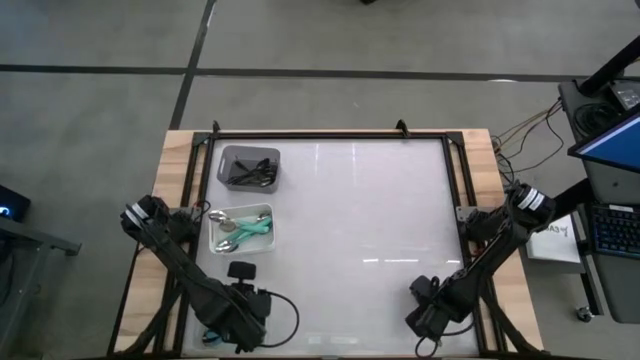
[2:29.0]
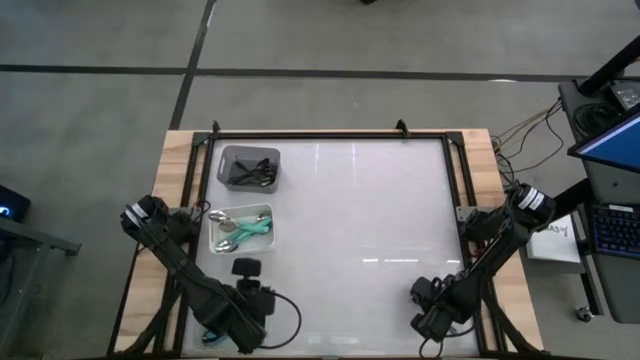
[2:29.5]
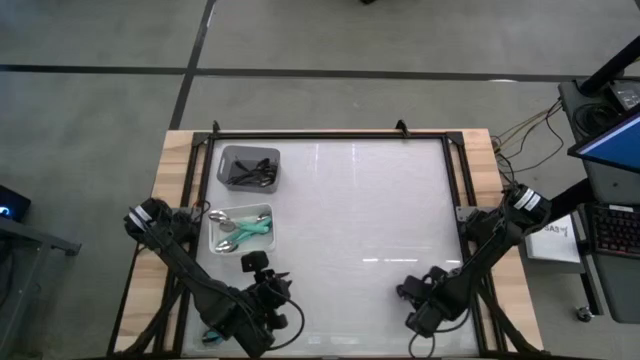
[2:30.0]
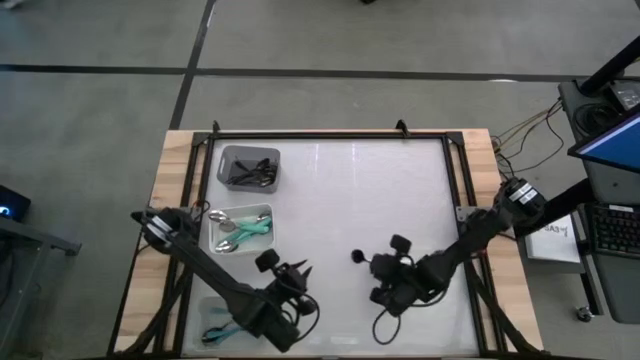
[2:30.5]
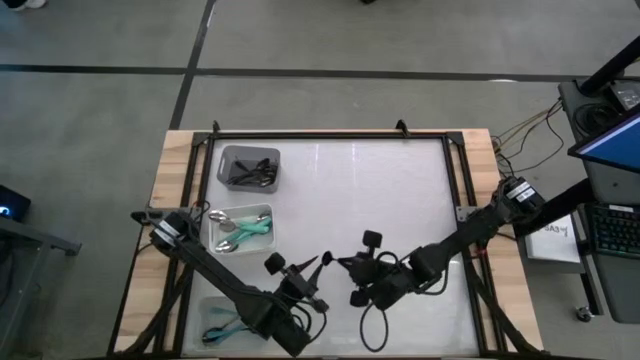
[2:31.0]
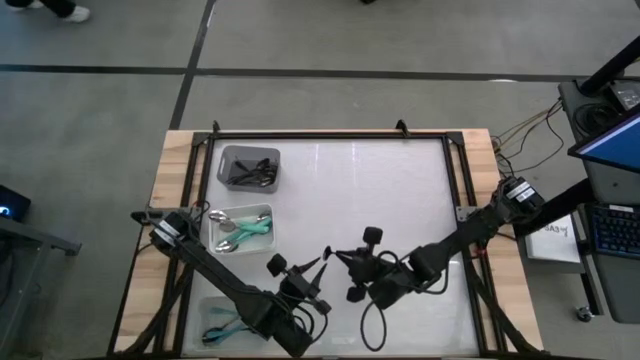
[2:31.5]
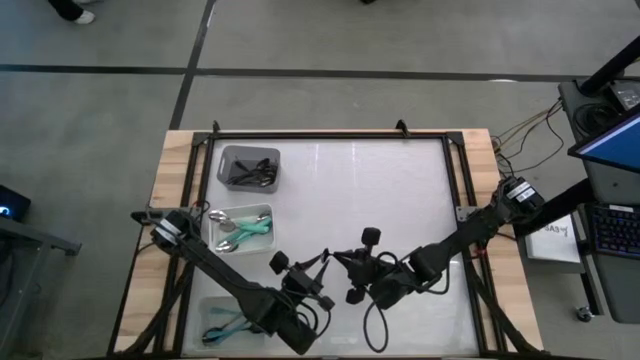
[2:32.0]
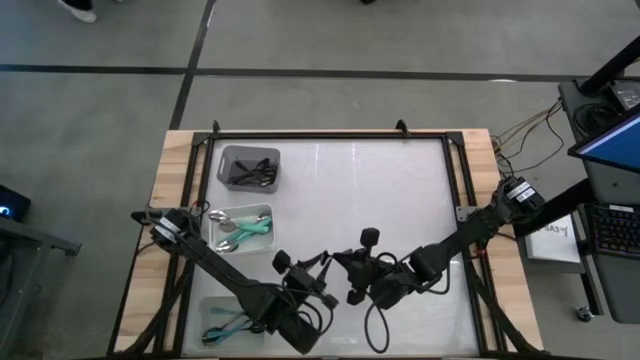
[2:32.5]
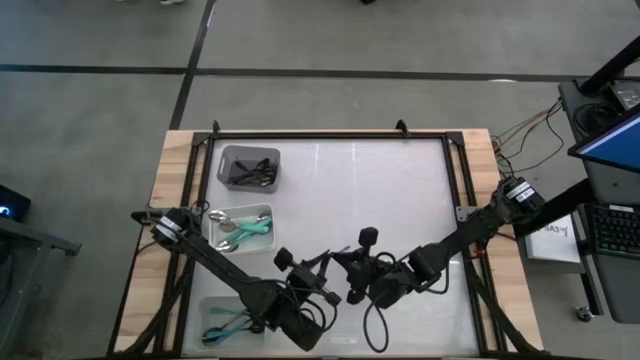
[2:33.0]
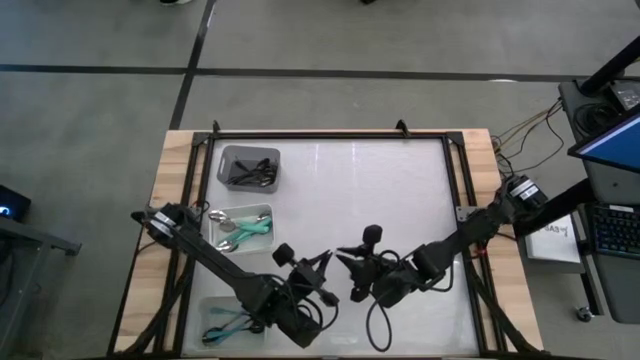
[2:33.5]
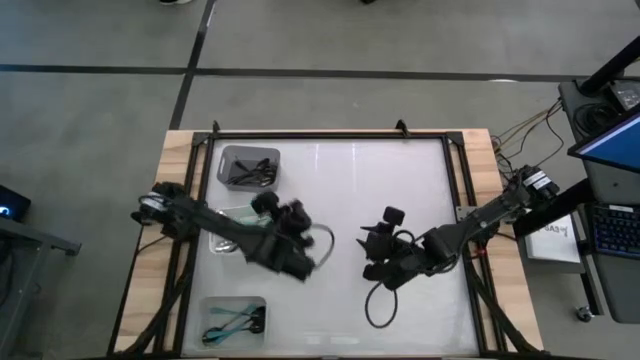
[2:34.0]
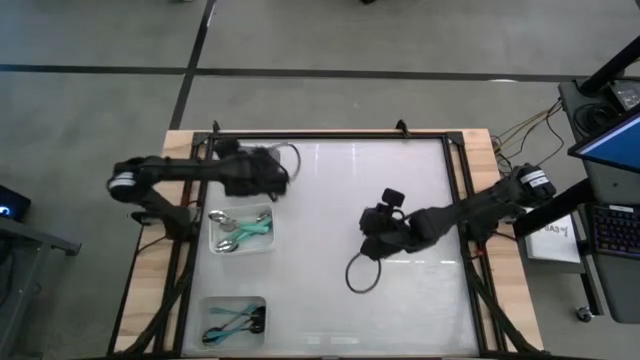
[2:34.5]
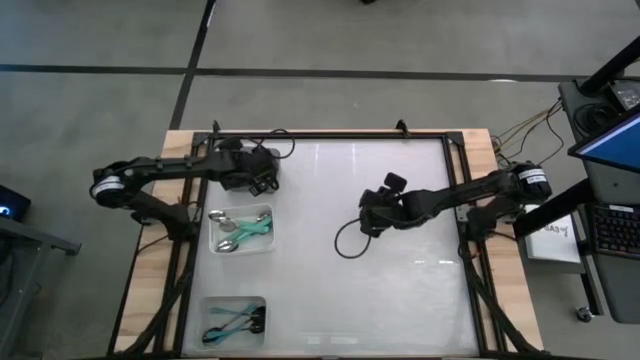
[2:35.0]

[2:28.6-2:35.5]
Task: Sort silverware by color (type)
Put the black spoon into the black bin

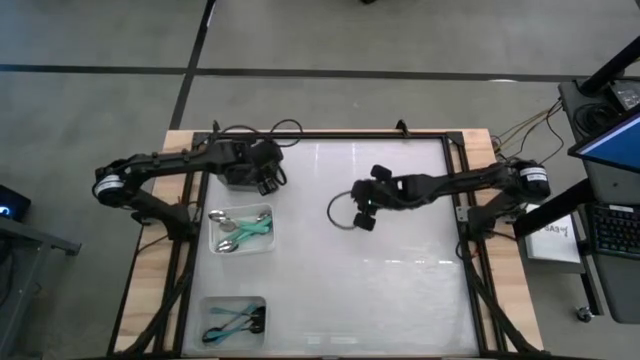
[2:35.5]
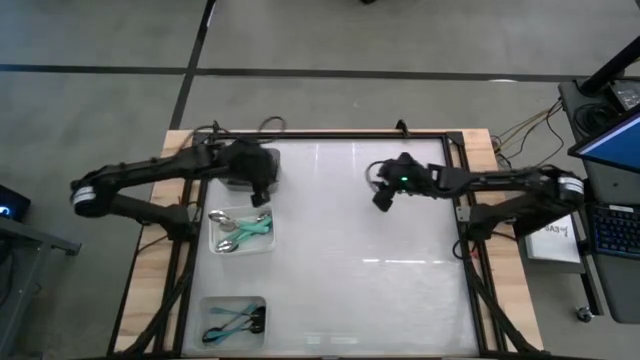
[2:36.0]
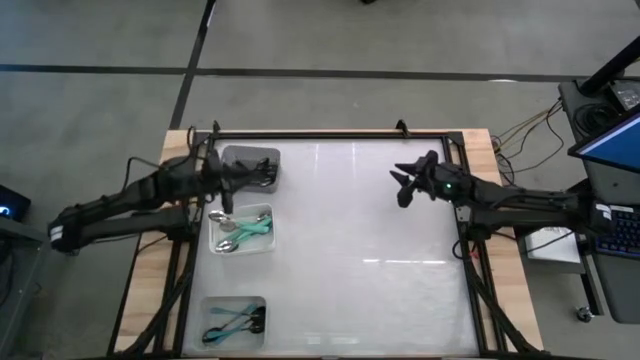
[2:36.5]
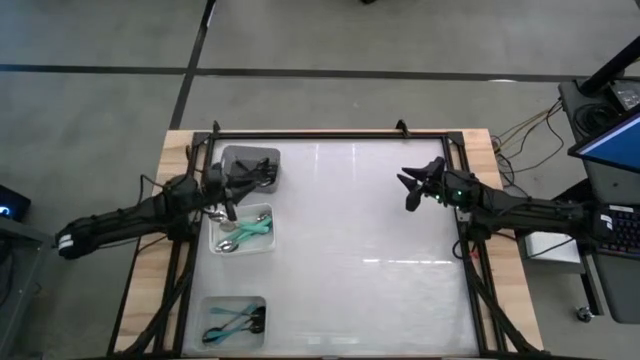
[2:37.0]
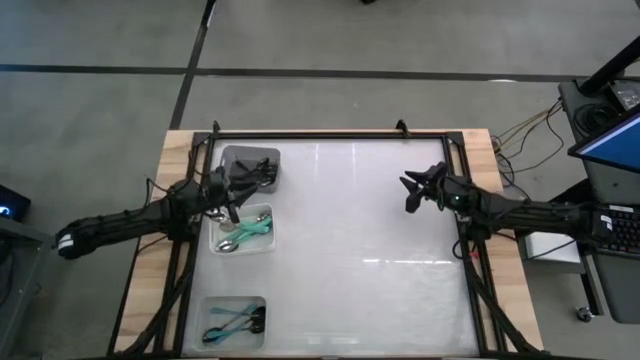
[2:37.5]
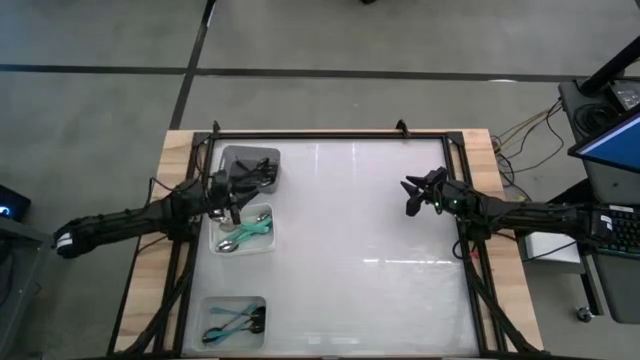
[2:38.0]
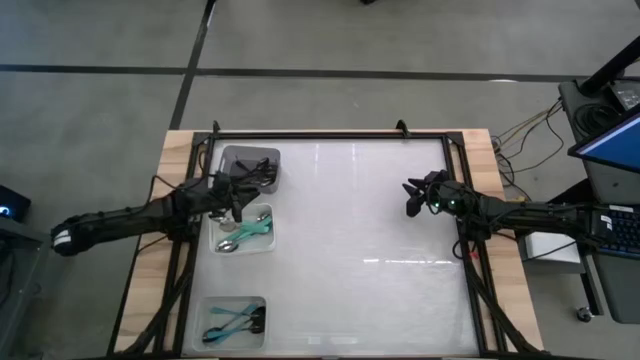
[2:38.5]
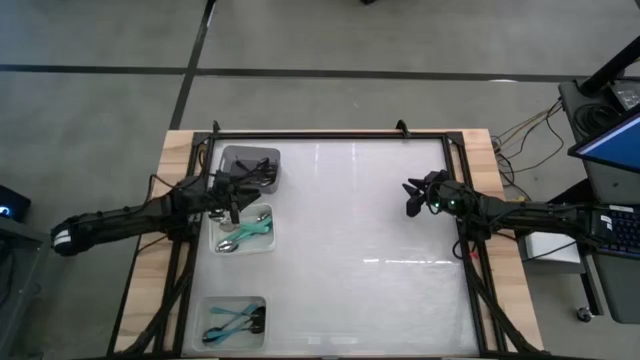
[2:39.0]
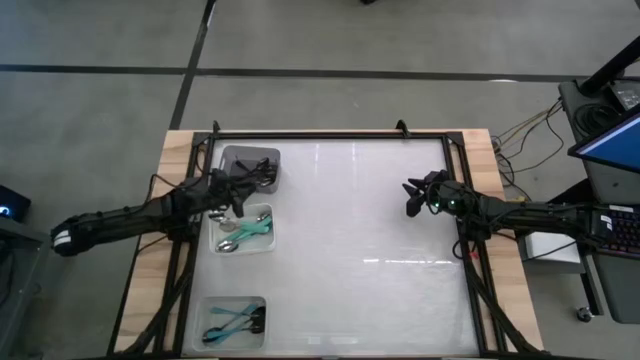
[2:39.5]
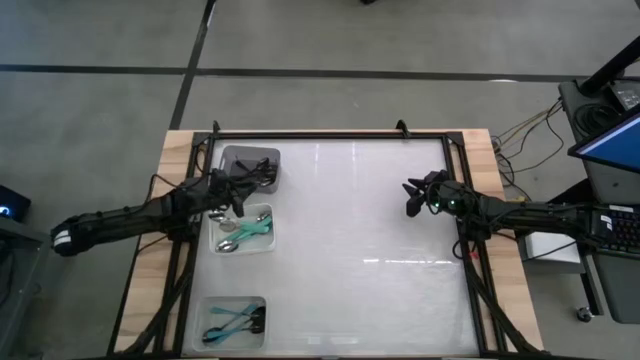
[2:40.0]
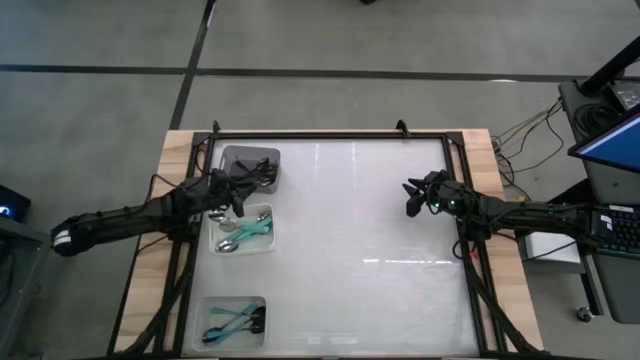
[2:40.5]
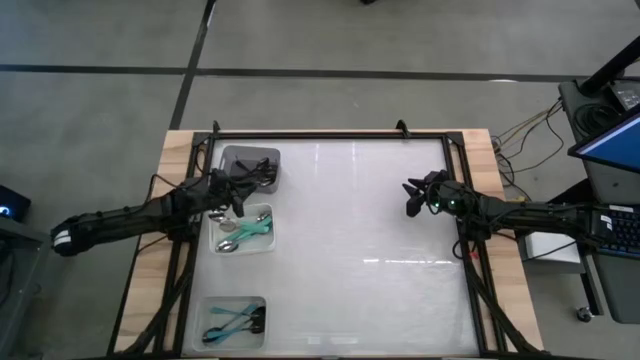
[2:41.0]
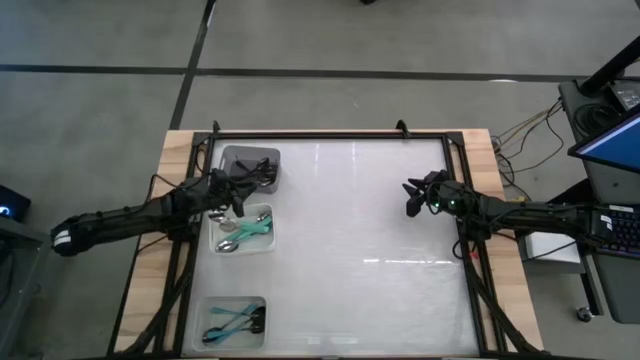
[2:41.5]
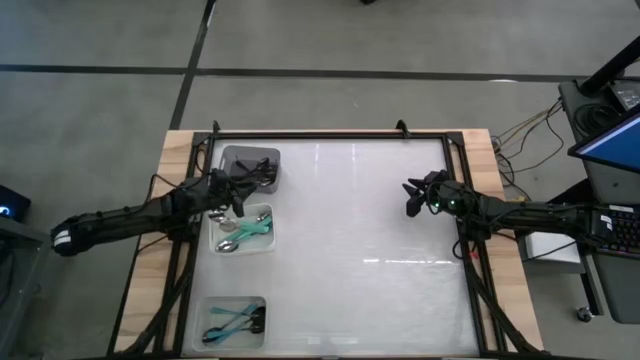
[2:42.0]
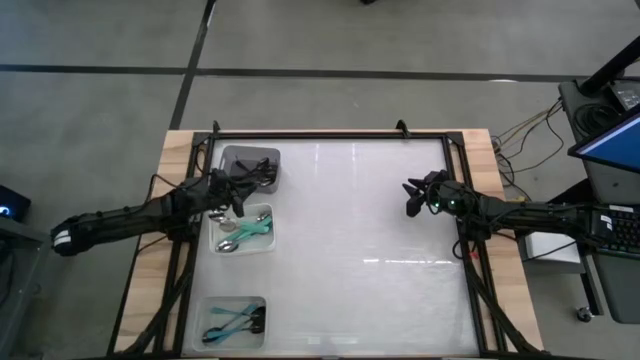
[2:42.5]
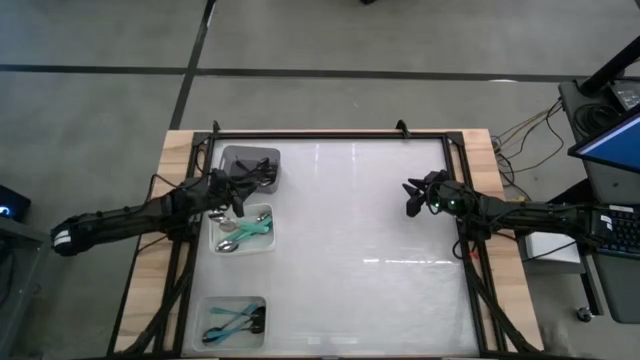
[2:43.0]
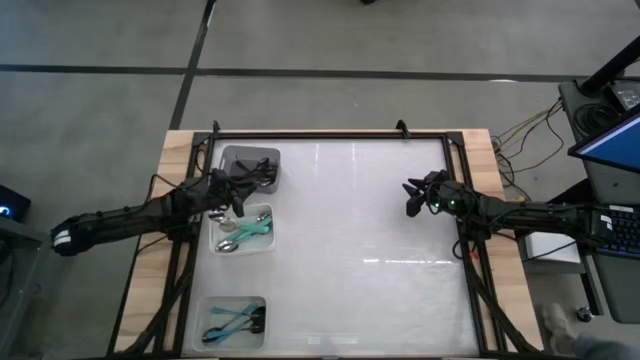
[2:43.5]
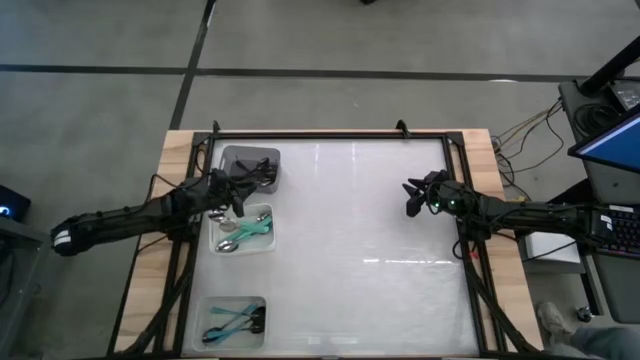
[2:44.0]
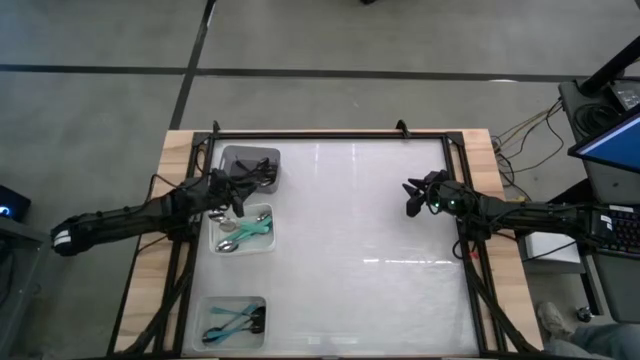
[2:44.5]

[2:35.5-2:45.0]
Return to Home Position

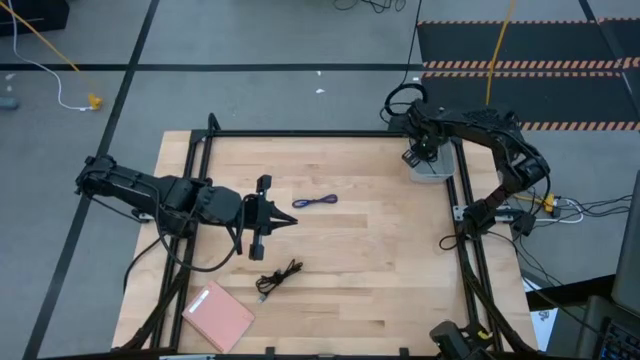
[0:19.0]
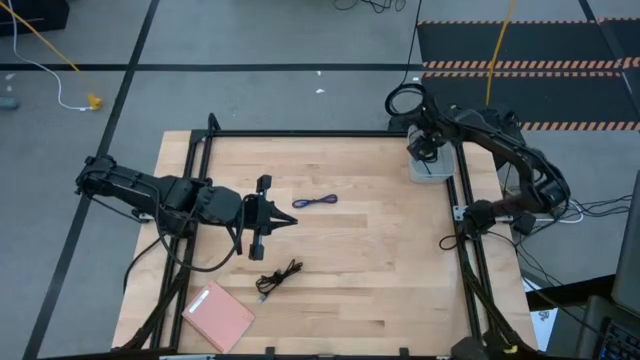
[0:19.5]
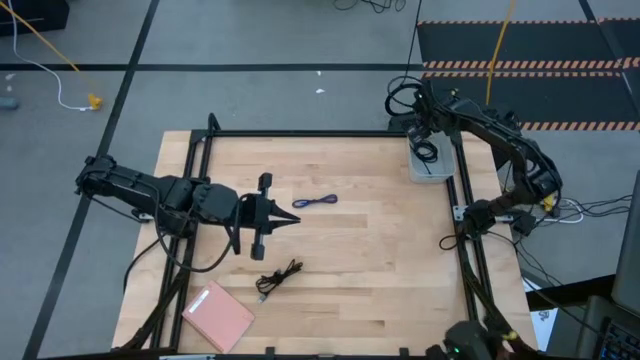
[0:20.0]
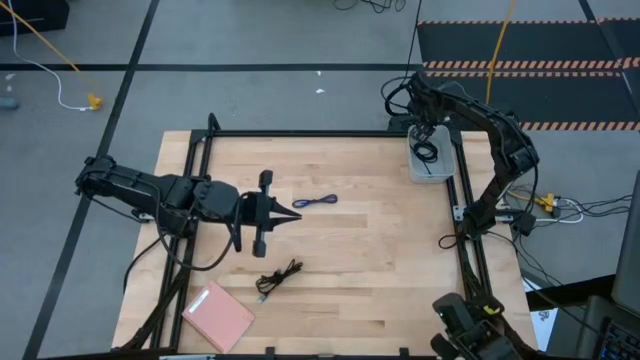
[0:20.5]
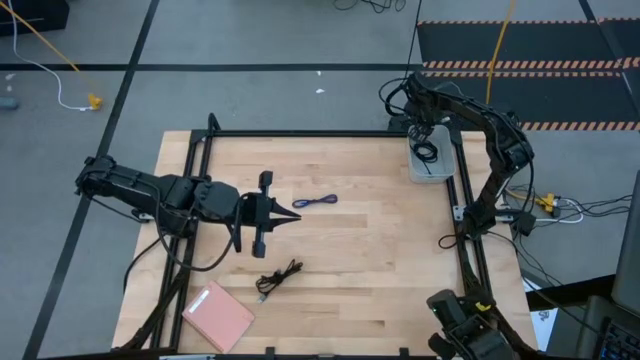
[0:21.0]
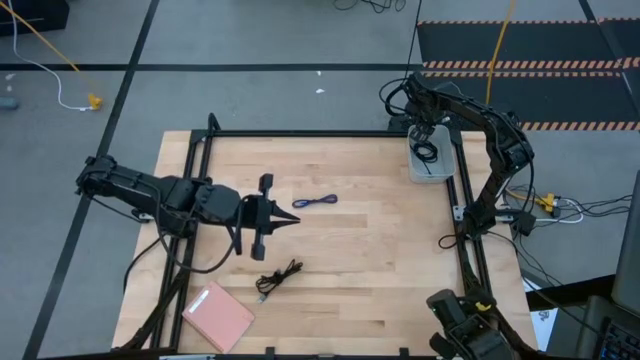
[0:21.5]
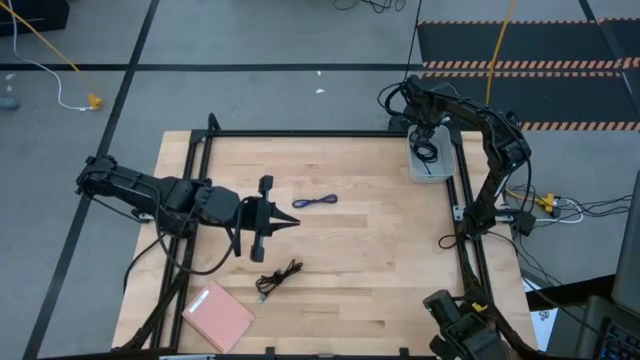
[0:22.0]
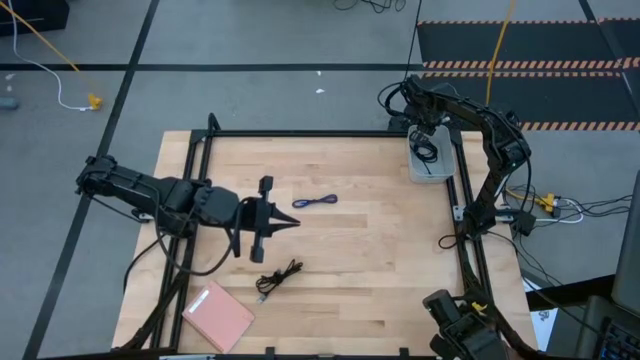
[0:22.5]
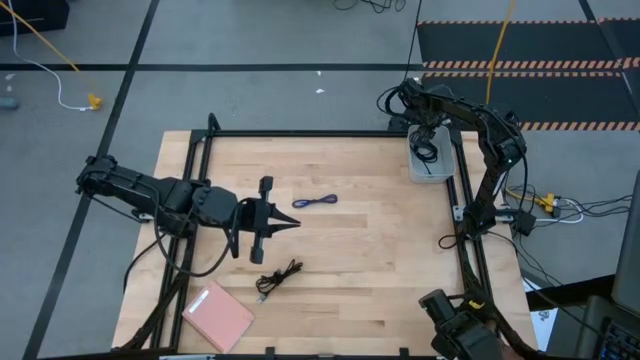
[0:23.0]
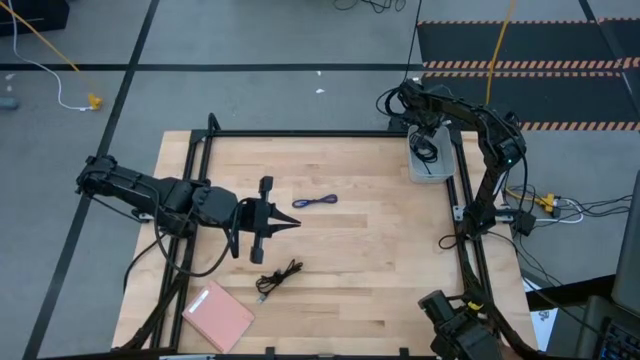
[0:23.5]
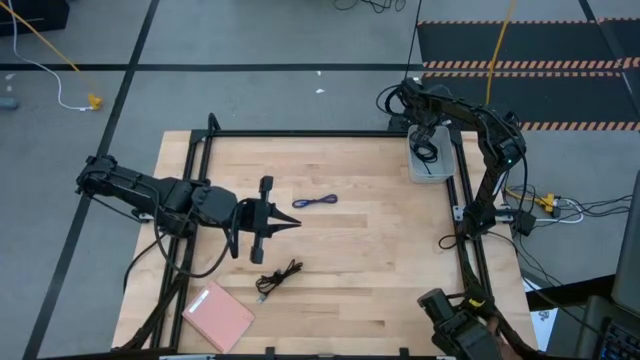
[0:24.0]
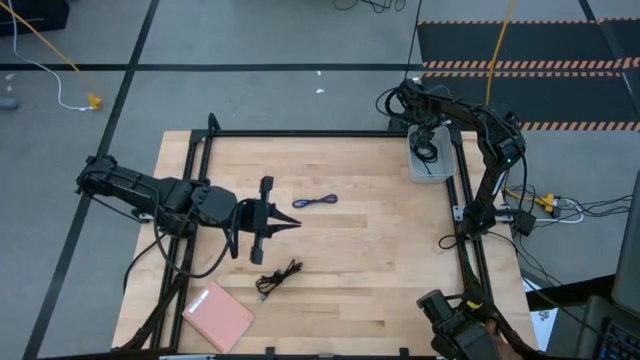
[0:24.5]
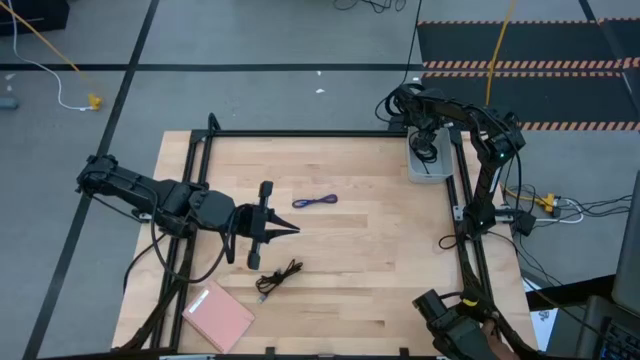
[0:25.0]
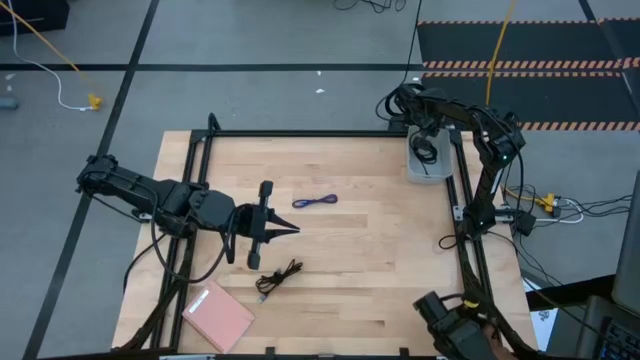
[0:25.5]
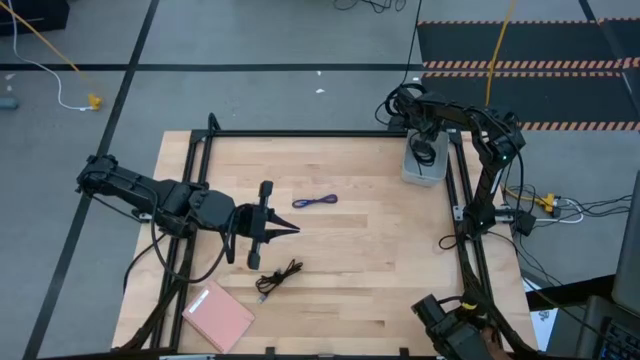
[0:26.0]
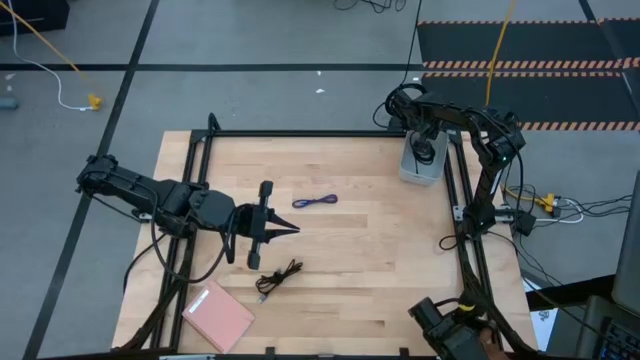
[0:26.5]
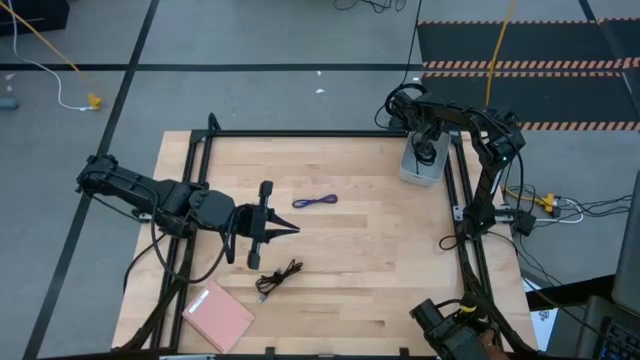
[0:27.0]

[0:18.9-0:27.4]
Task: Pick and place USB-C Cables
Adjust the black charger cable in the white bin
